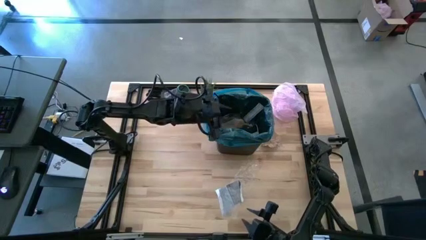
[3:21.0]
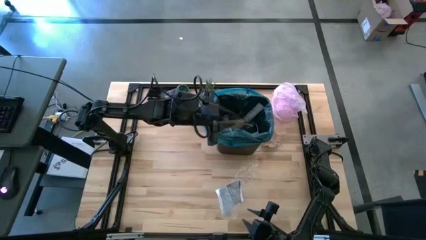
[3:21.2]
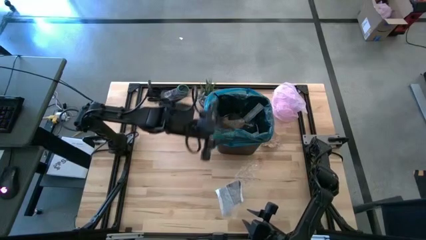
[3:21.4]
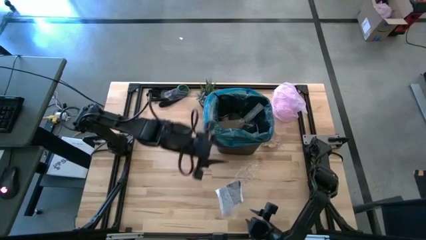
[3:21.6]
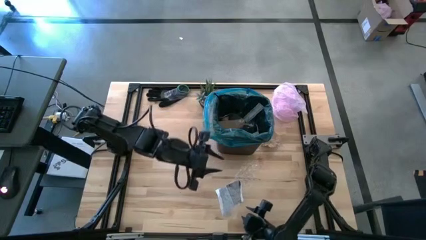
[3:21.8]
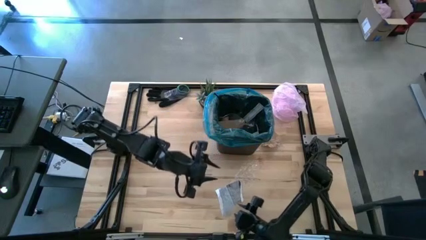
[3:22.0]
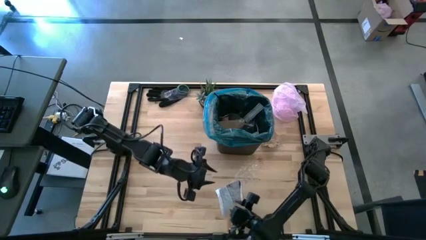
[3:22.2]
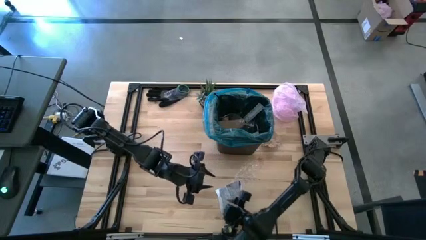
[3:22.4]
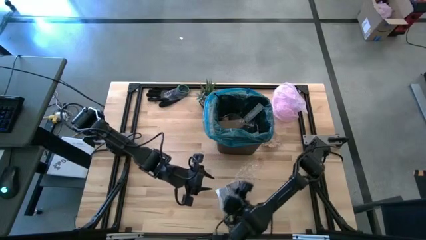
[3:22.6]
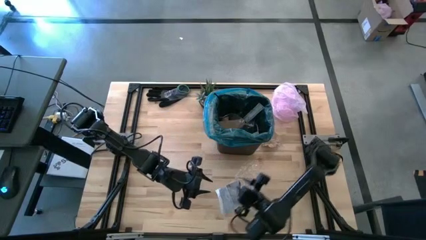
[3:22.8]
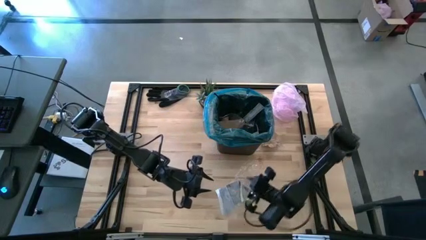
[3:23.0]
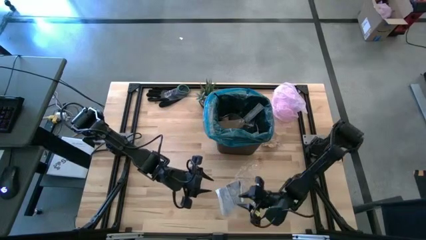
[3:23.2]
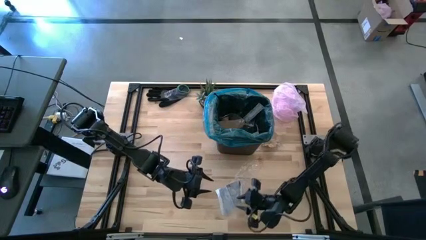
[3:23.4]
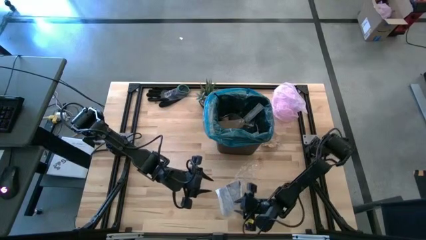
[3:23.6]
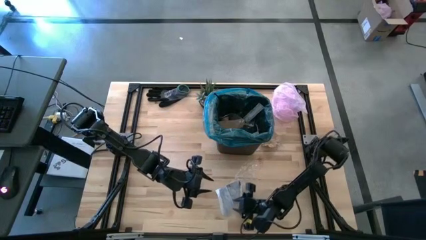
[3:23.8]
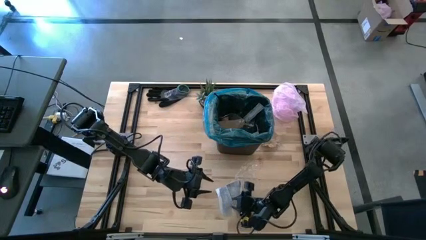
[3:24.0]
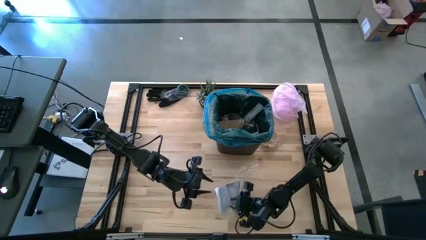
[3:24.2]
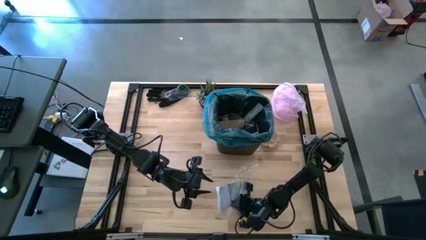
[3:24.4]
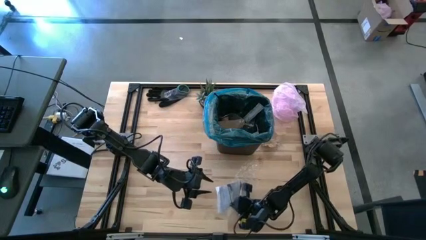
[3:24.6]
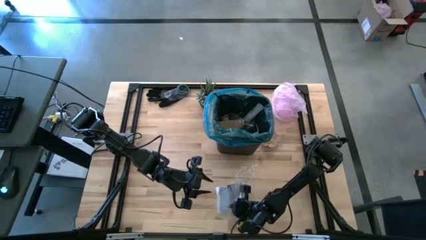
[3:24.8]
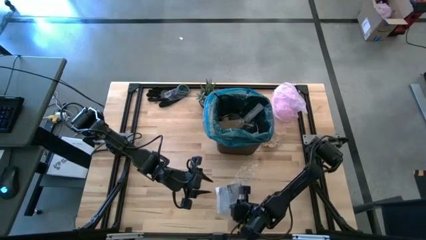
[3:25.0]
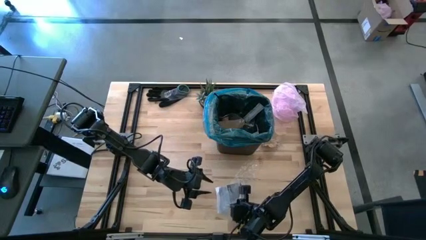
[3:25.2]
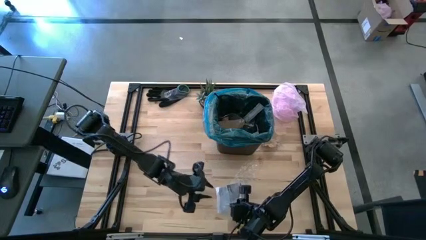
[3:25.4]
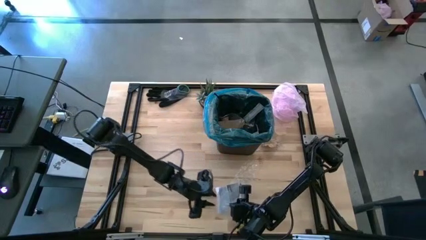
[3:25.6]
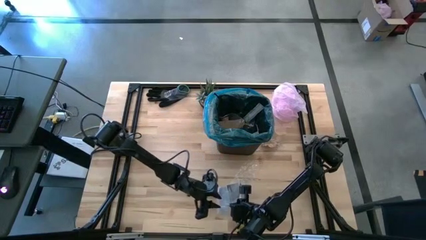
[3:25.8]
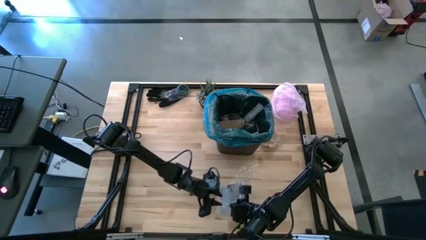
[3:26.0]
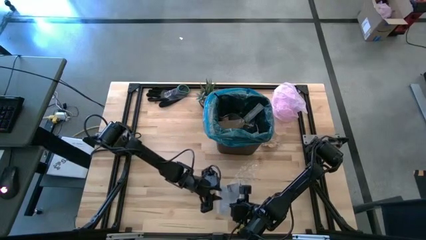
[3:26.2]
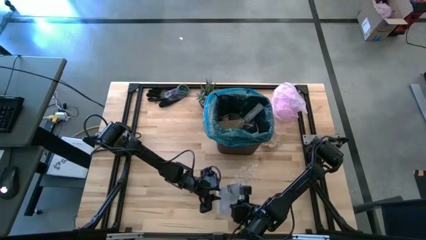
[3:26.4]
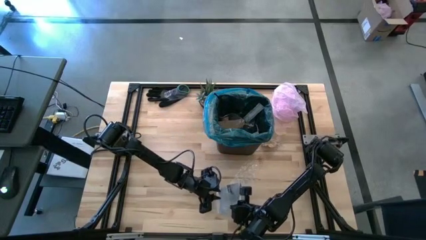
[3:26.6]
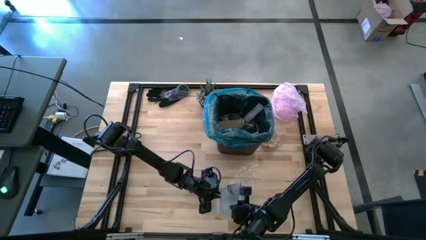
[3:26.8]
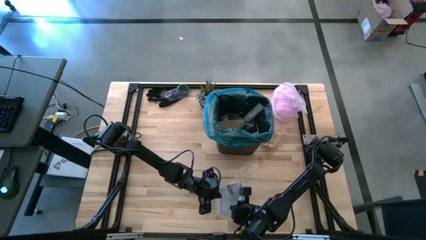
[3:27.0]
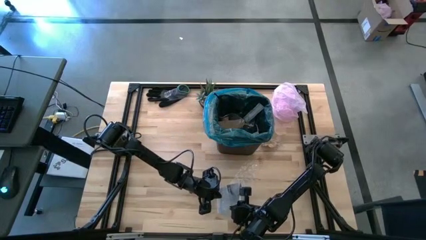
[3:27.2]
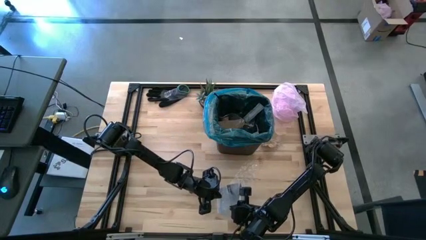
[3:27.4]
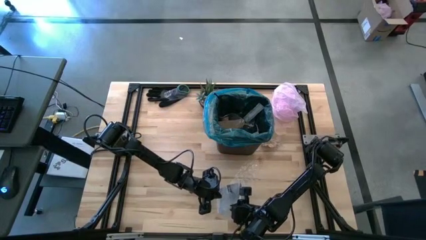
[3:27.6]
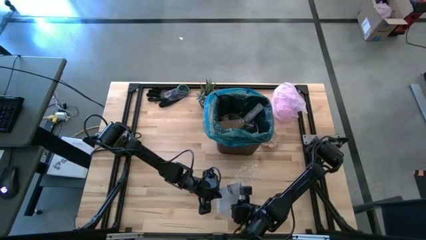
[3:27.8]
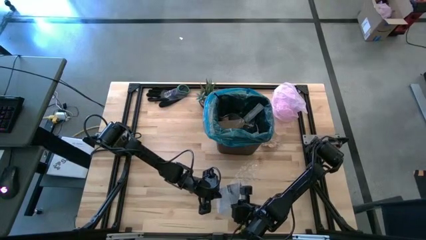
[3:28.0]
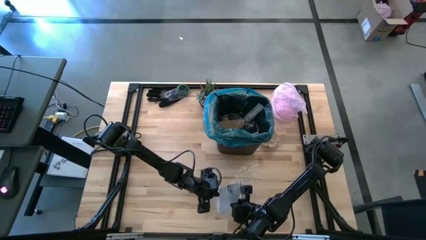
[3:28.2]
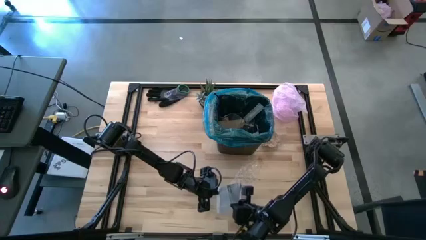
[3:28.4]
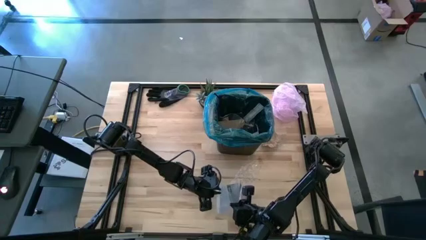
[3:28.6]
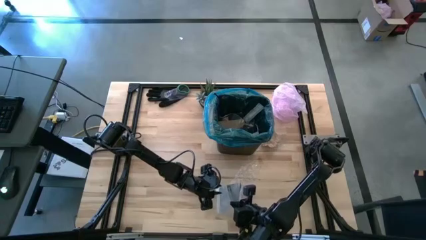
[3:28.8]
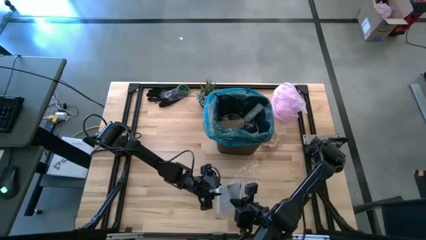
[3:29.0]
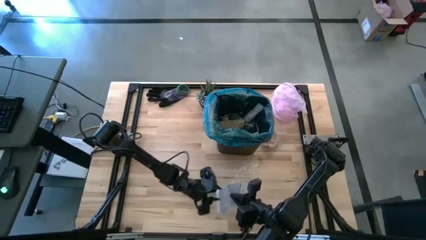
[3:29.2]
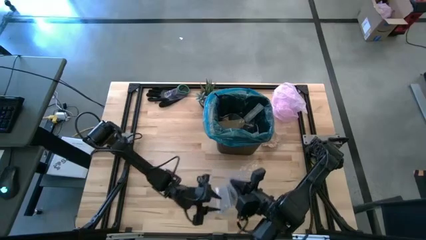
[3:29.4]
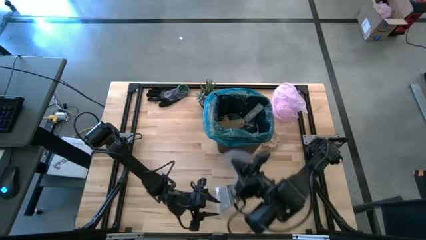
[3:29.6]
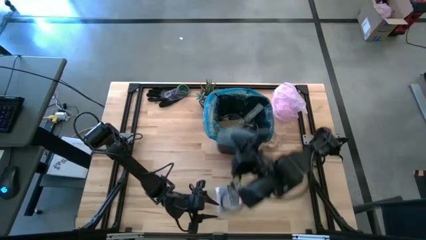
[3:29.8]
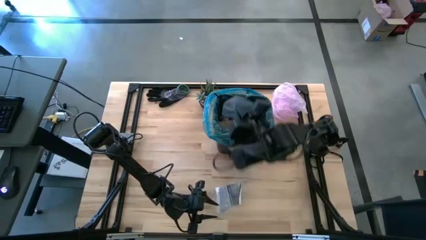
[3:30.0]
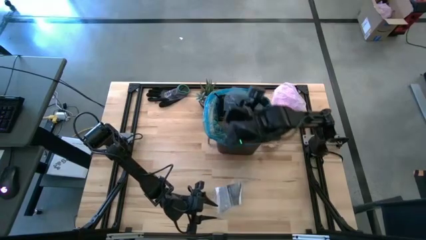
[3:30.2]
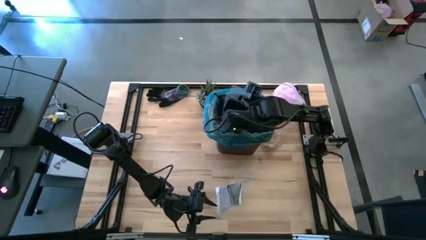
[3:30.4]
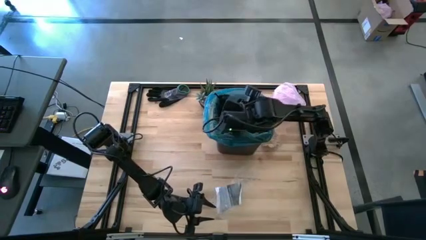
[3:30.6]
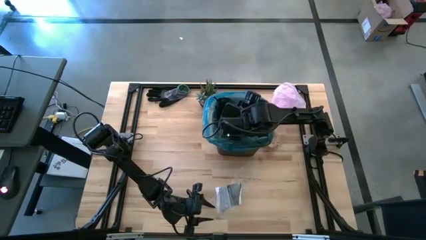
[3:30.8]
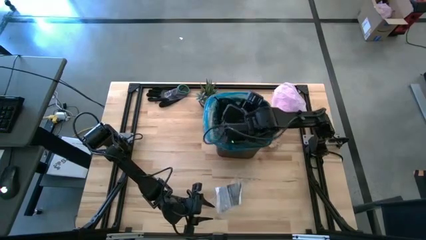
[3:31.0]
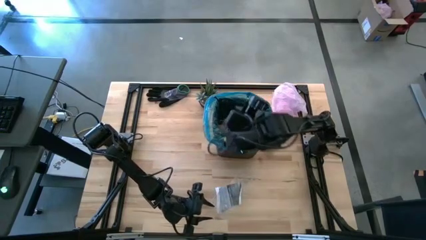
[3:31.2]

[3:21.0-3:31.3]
Task: place trash/remove bag and relplace
Put the transparent plastic into the trash bin

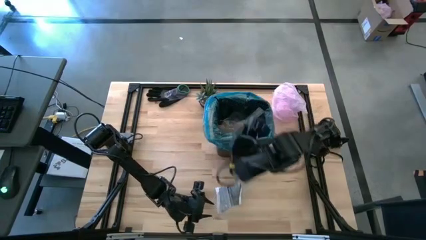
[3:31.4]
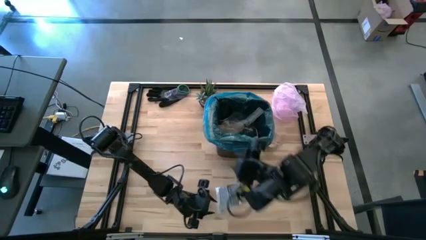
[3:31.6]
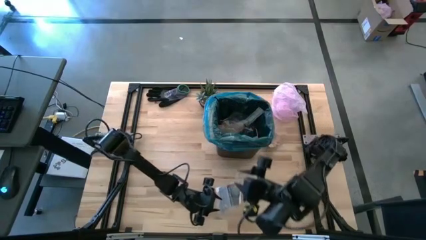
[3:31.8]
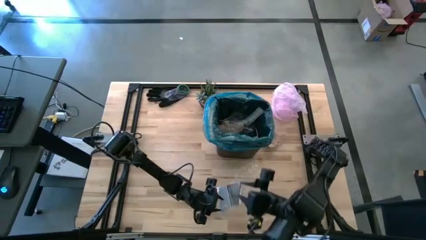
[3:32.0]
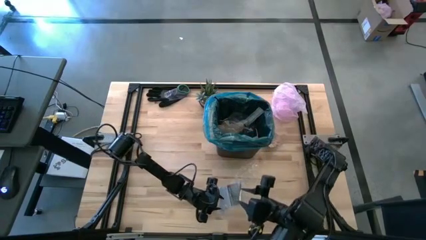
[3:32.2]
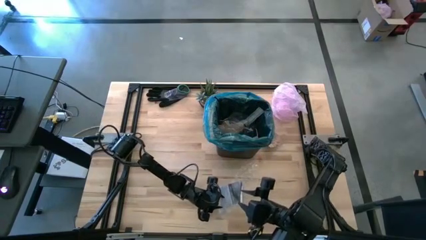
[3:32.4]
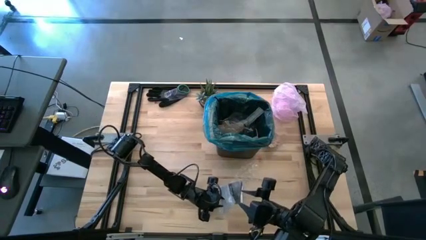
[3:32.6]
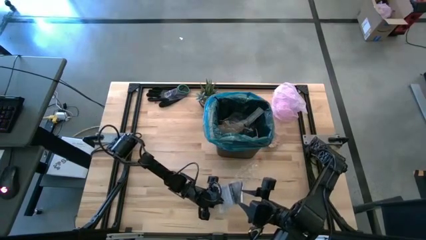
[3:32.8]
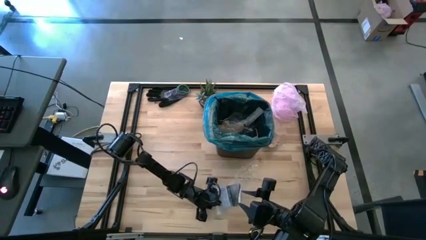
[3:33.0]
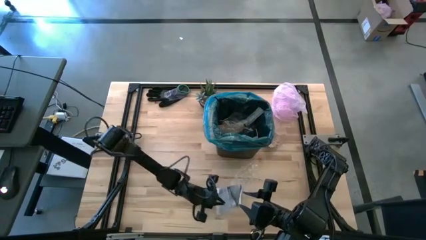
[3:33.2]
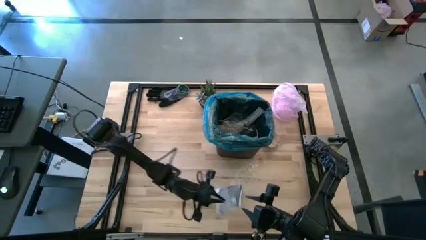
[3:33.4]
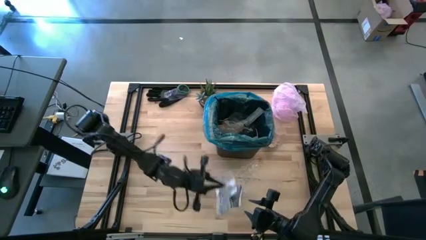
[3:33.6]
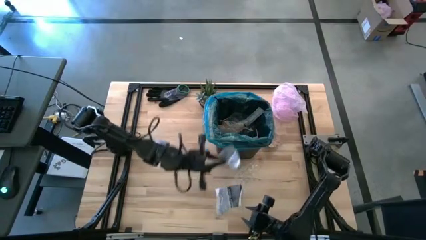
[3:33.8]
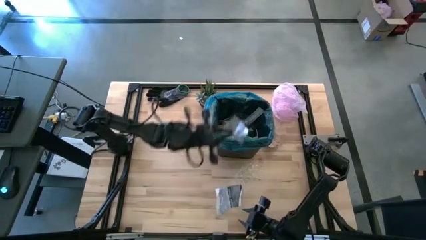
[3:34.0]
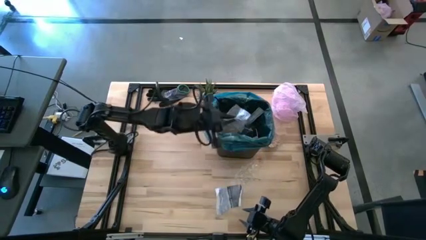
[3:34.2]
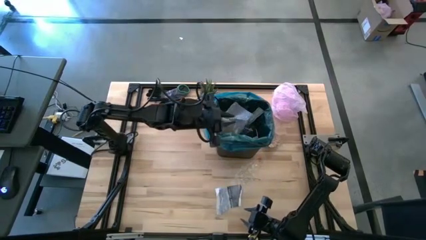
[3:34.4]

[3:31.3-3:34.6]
Put the transparent plastic into the trash bin

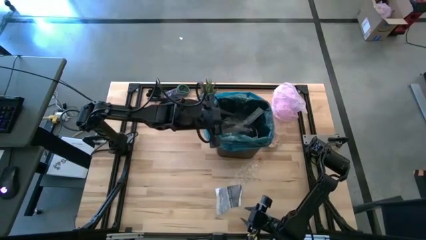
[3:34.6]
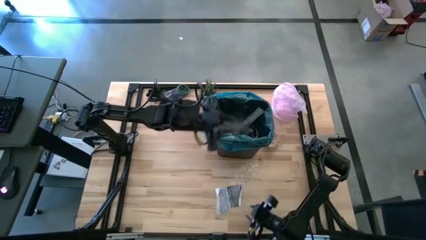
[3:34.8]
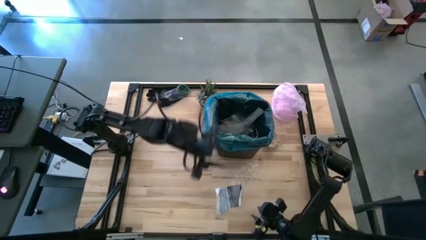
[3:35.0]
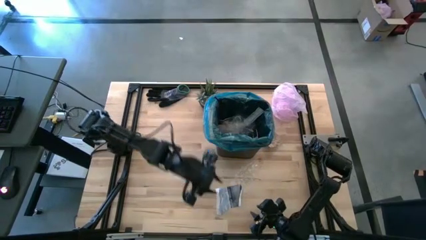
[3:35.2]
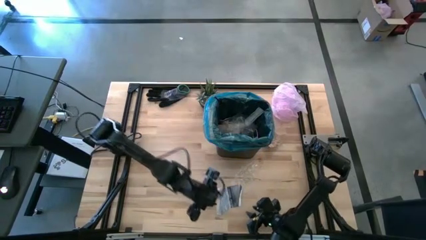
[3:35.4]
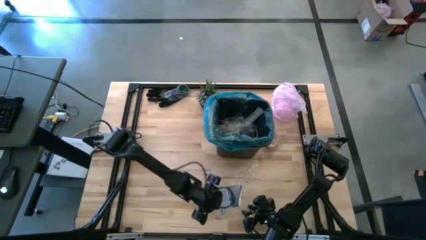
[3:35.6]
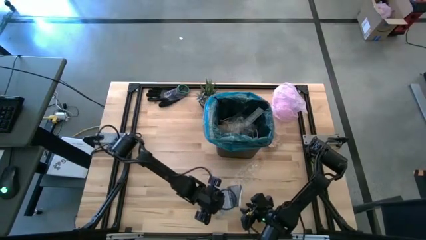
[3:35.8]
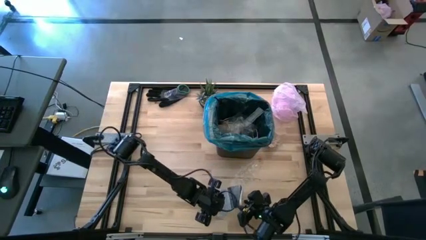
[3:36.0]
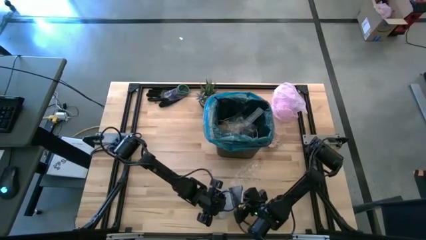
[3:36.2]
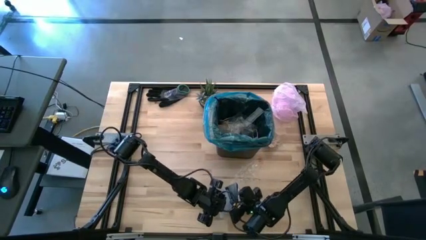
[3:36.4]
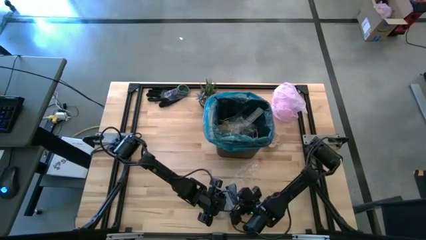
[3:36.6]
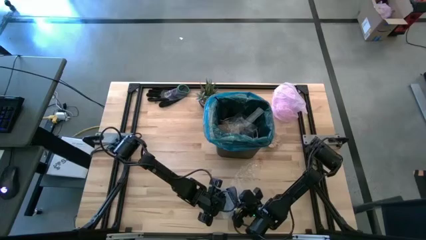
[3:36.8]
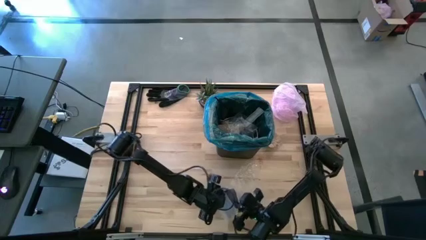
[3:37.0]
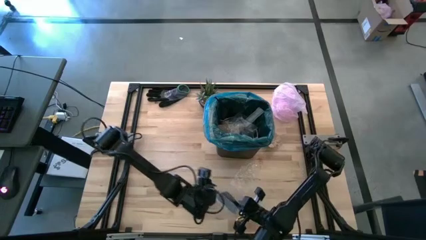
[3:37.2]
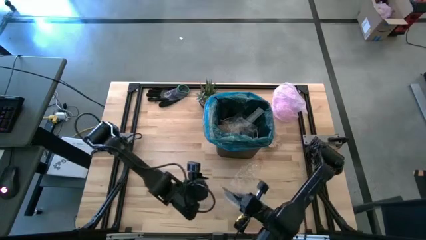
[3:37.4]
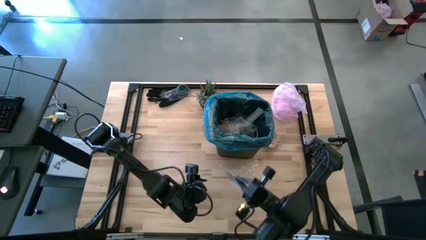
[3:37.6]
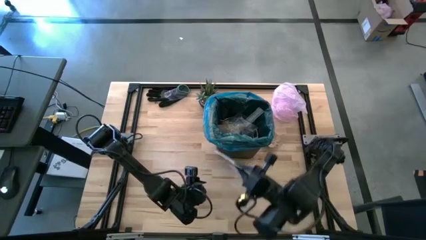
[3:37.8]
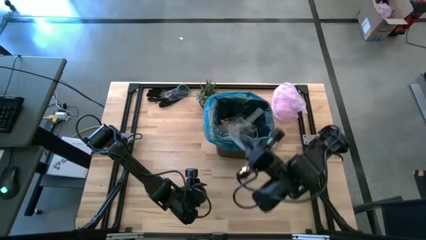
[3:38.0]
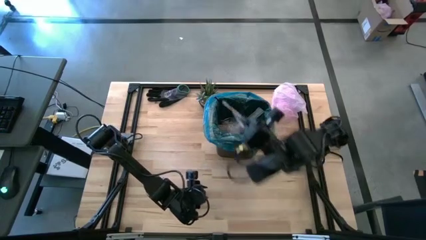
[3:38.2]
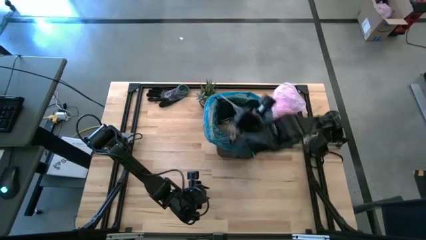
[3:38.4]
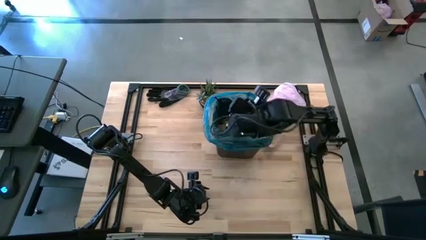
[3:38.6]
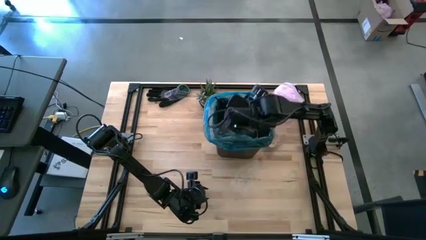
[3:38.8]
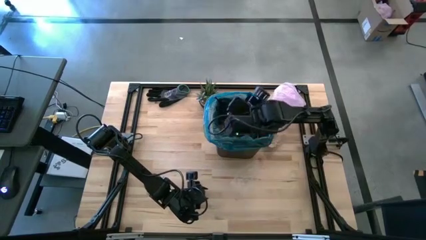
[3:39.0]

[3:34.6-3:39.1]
Put the gray paper into the trash bin
